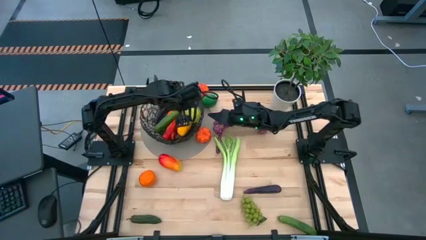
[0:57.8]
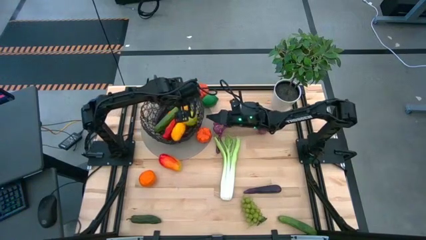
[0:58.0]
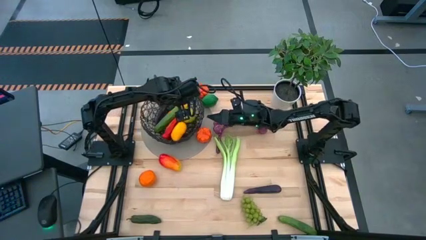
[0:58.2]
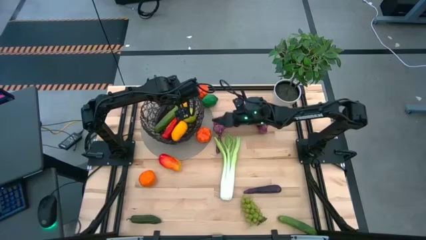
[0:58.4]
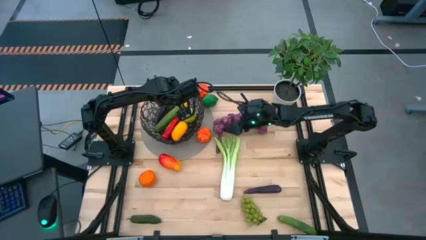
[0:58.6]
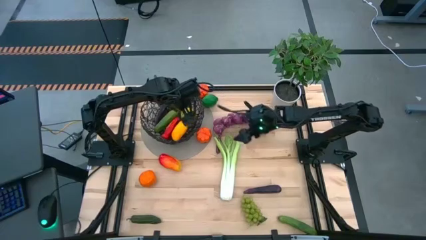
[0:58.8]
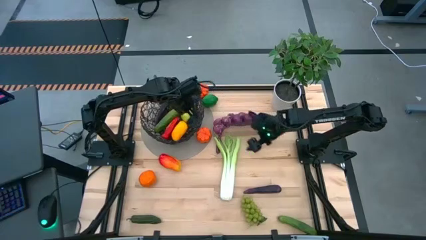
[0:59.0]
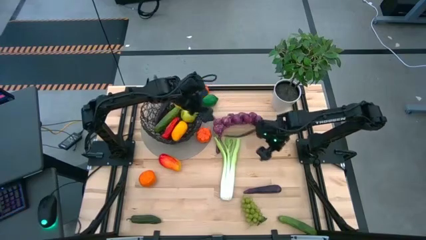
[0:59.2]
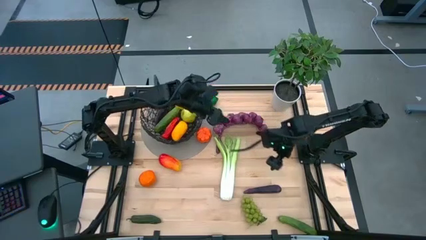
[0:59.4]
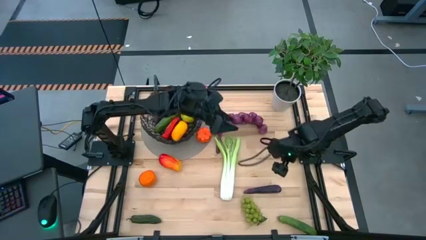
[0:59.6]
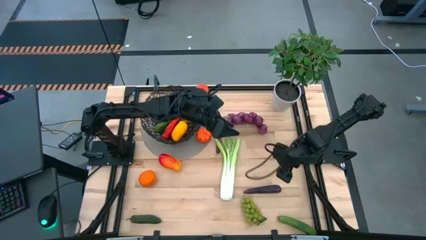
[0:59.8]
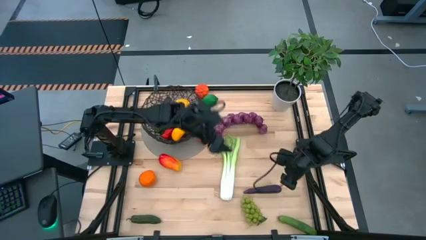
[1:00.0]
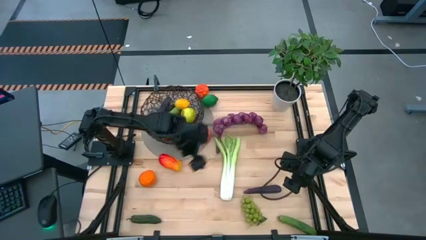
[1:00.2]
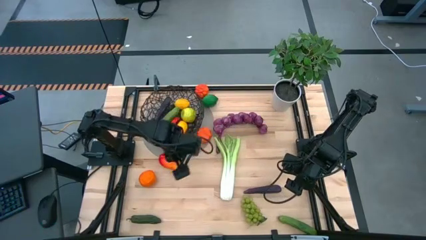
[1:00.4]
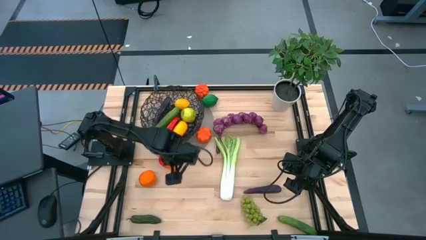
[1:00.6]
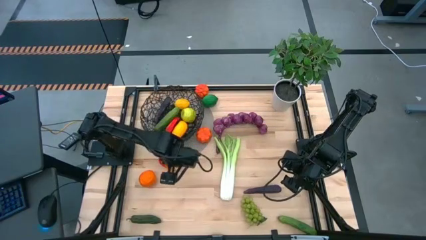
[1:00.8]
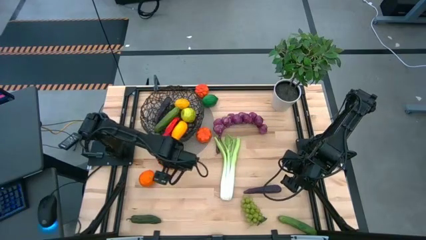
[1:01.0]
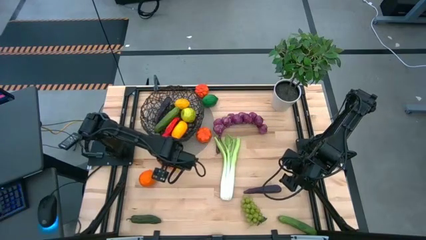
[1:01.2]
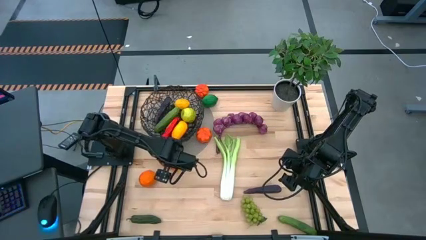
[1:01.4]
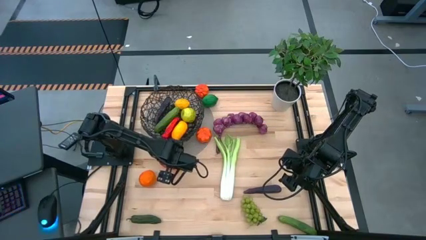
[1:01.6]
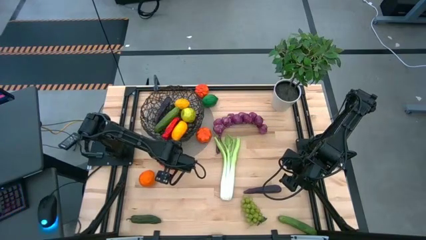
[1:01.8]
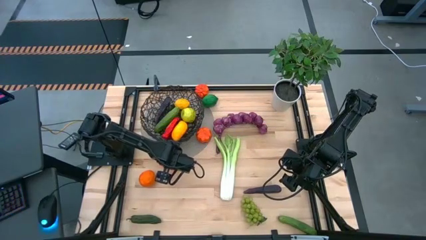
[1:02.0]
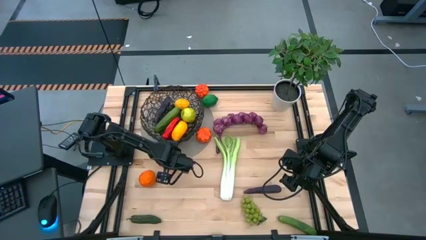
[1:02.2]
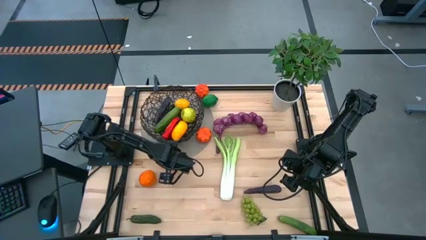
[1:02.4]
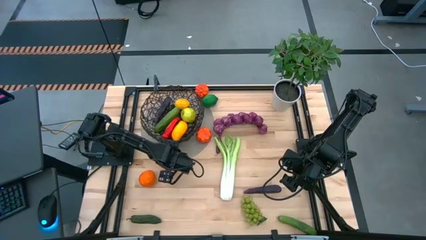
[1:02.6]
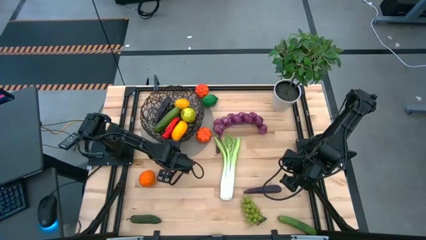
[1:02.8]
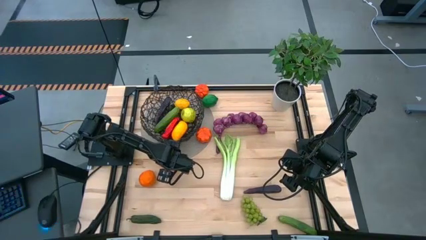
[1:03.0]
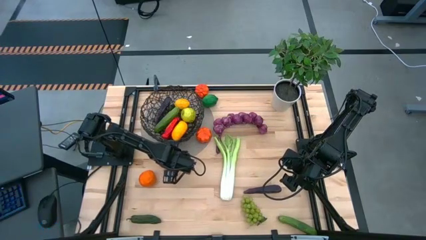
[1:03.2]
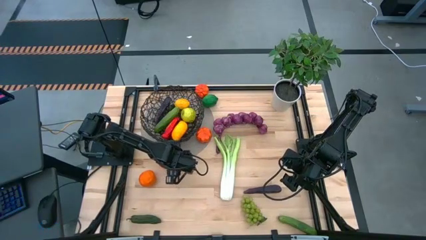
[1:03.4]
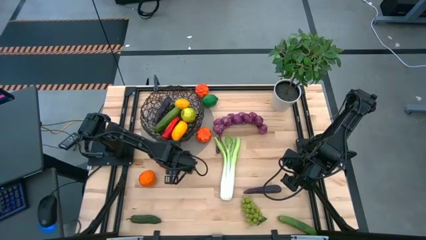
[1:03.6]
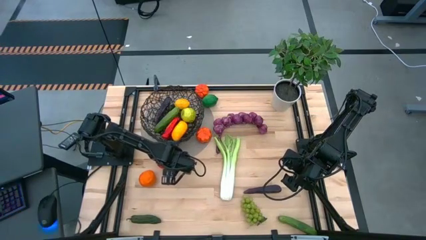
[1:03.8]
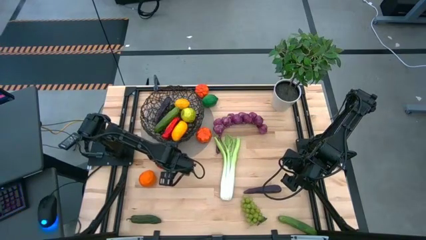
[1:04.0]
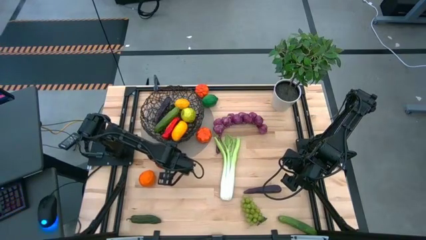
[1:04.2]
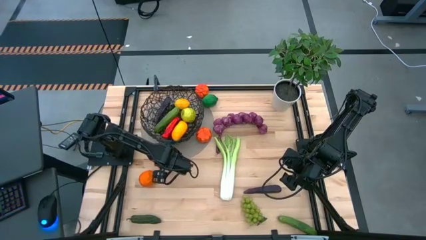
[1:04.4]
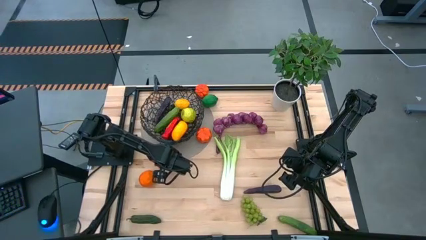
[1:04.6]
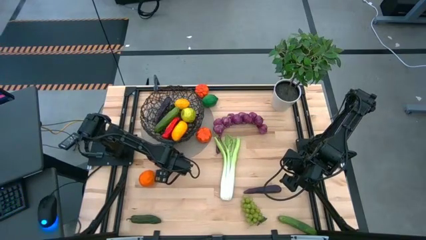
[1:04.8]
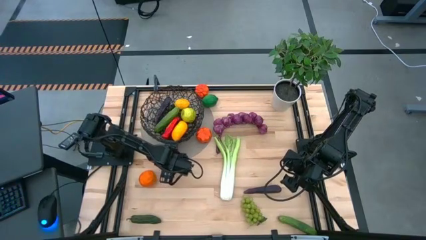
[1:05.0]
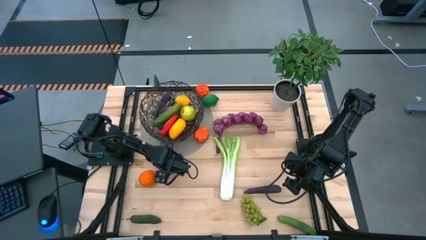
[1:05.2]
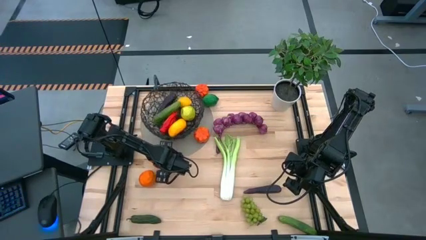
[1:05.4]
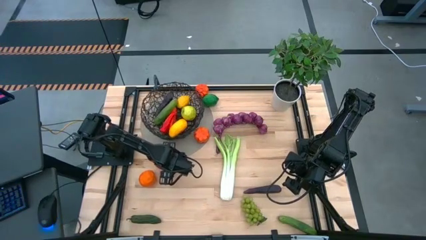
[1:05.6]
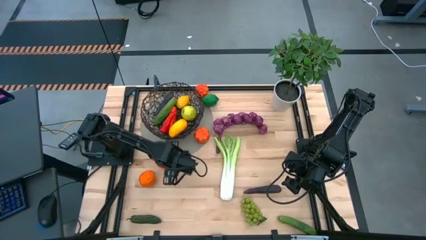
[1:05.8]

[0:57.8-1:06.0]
Task: Build produce basket
Put the orange mango into the wire basket

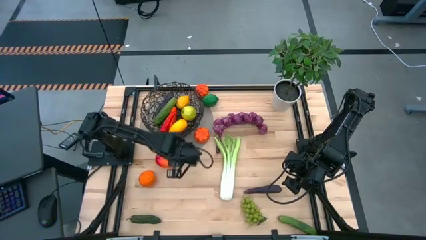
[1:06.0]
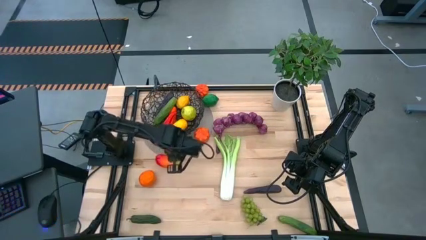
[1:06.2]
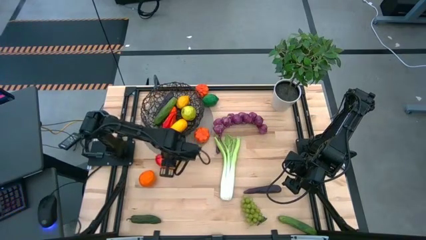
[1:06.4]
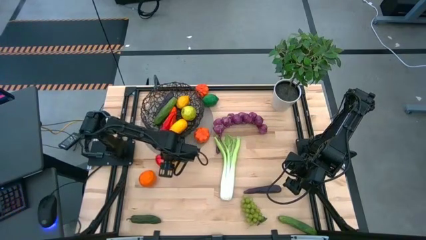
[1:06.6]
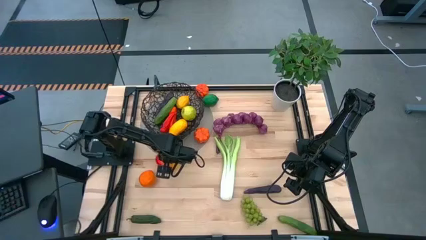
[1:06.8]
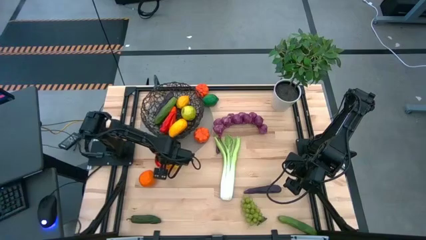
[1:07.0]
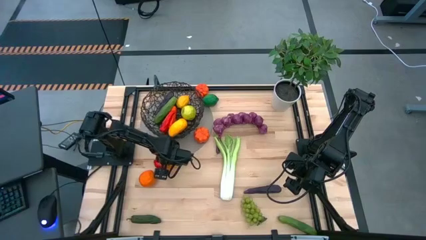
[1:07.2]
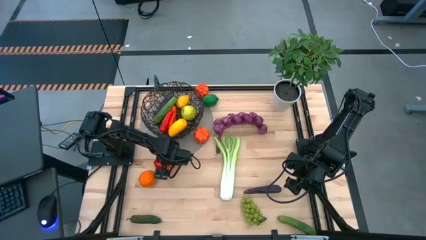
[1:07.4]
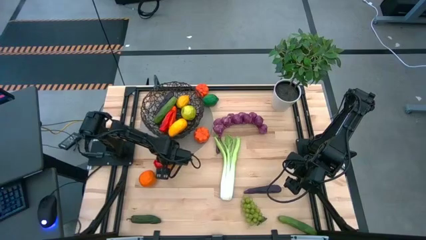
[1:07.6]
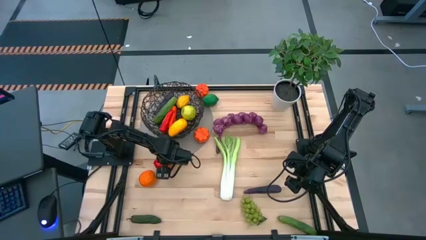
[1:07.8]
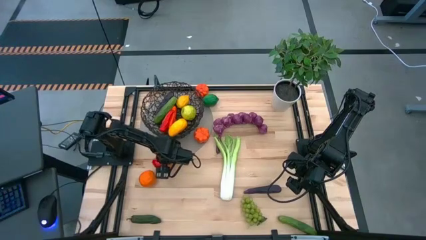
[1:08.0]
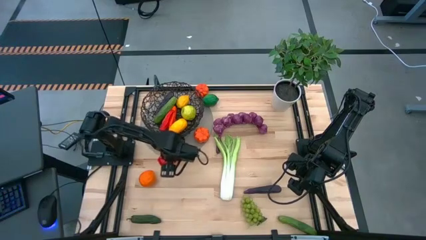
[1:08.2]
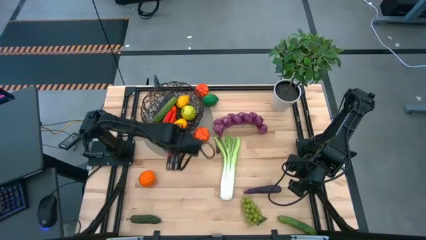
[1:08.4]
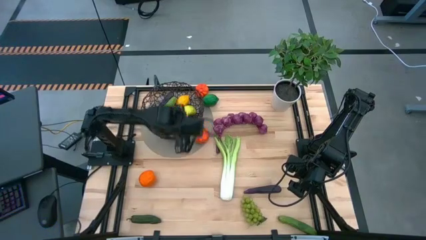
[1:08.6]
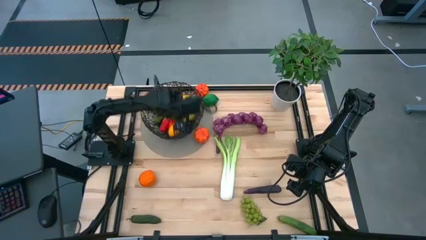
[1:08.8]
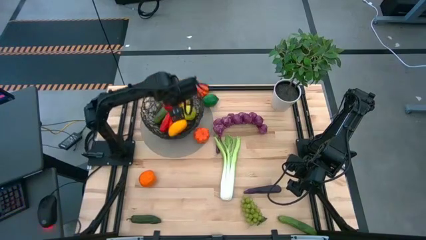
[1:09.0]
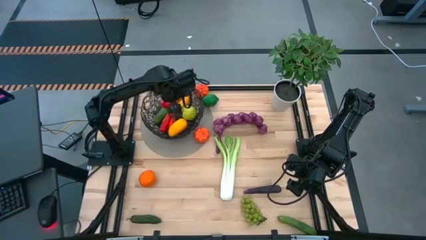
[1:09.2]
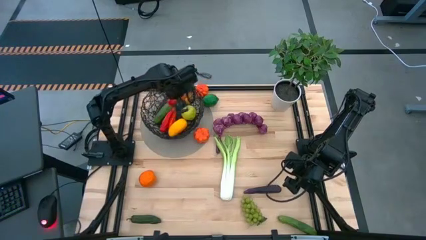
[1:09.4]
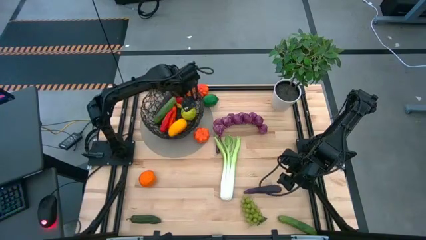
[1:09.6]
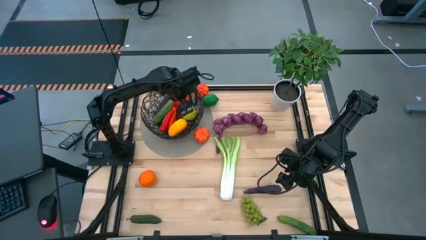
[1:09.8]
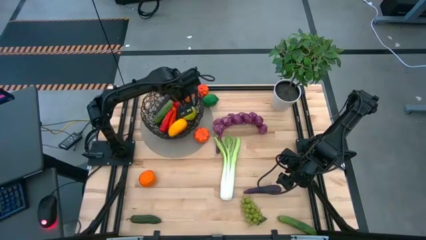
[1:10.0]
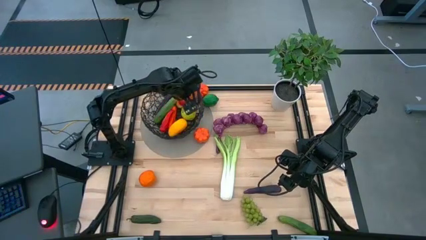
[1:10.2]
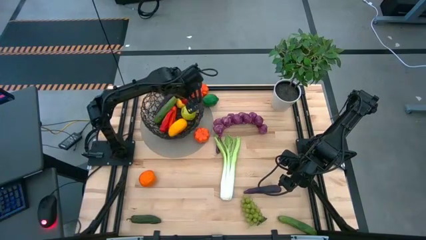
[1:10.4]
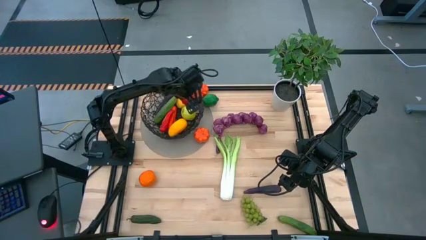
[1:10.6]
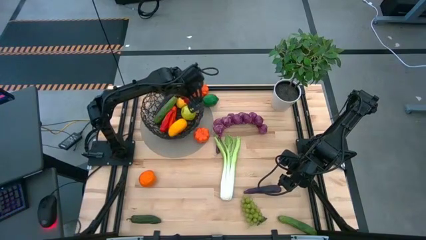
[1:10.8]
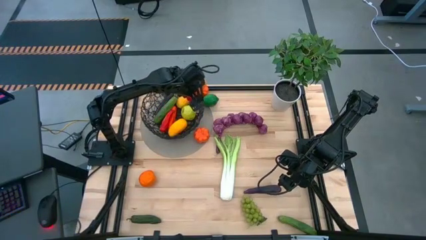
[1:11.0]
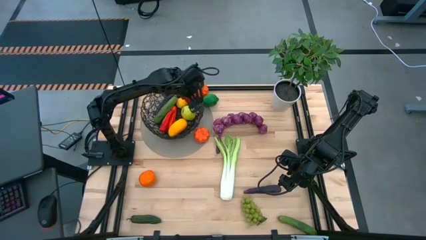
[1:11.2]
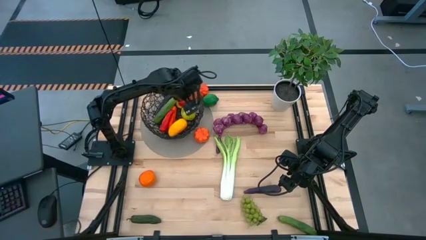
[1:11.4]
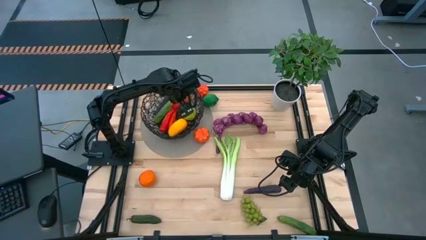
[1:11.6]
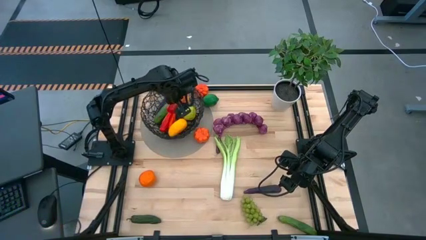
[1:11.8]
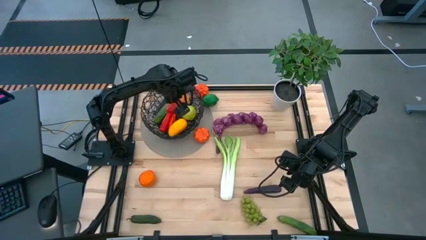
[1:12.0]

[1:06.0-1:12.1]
Put the orange mango into the wire basket
